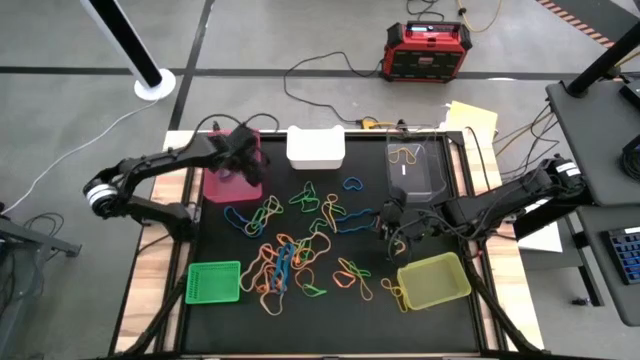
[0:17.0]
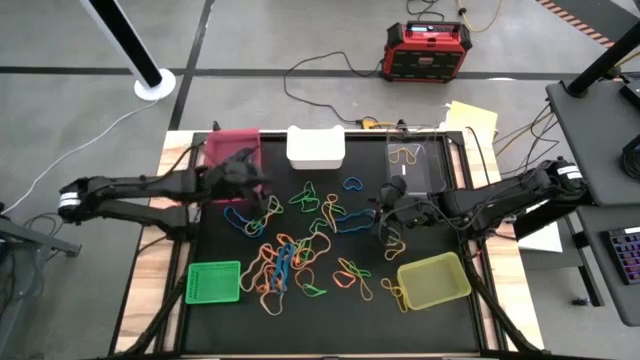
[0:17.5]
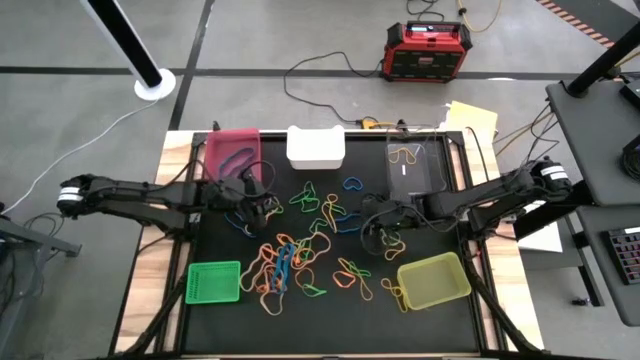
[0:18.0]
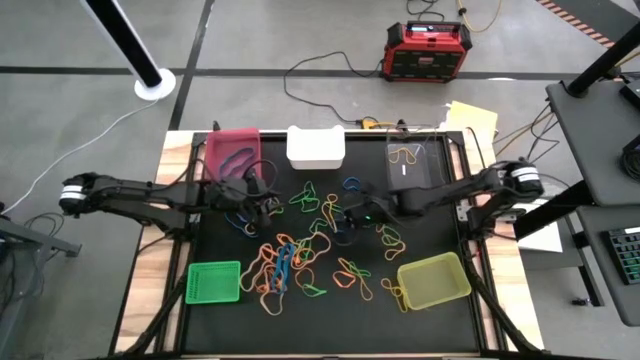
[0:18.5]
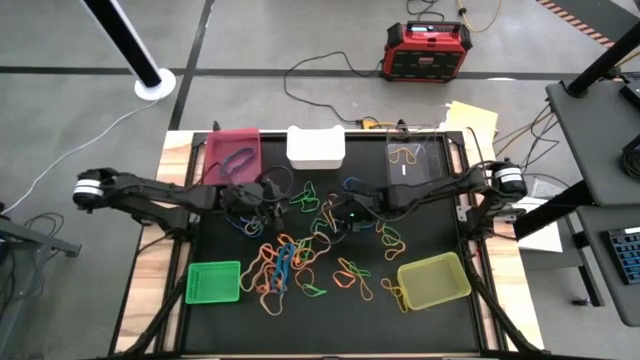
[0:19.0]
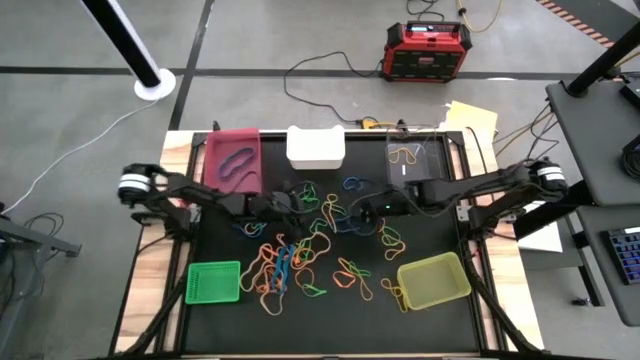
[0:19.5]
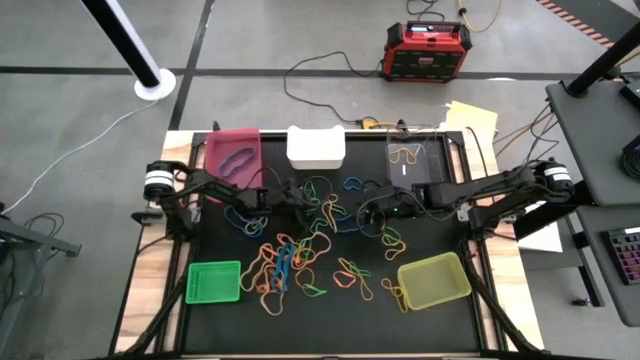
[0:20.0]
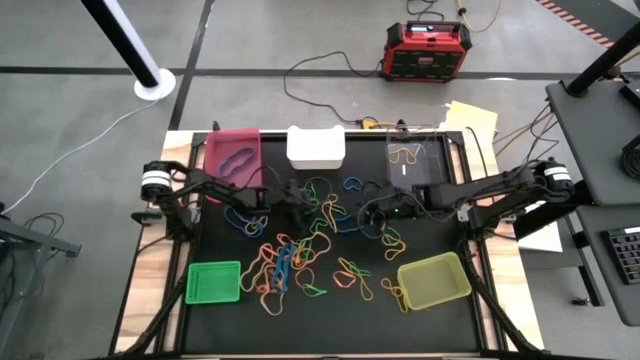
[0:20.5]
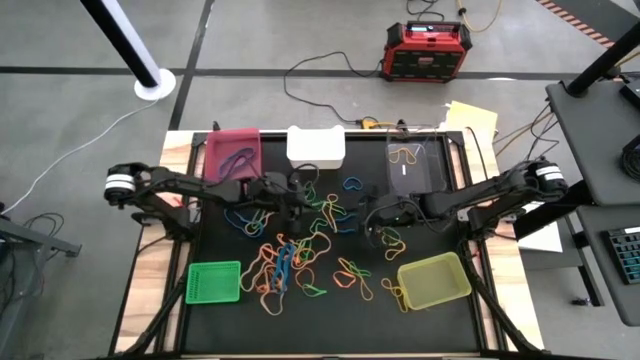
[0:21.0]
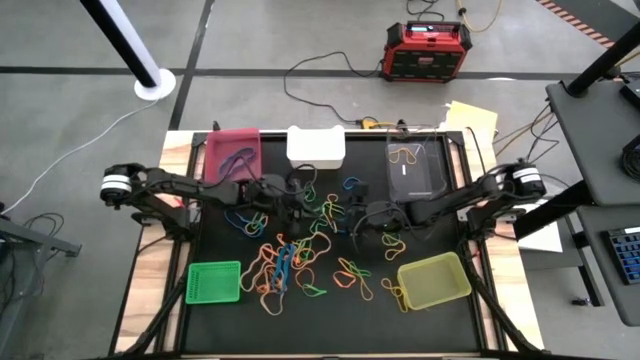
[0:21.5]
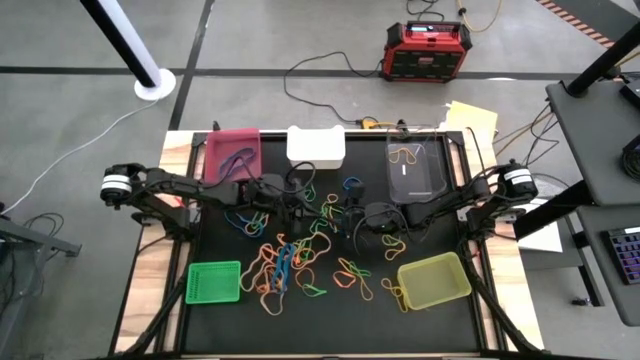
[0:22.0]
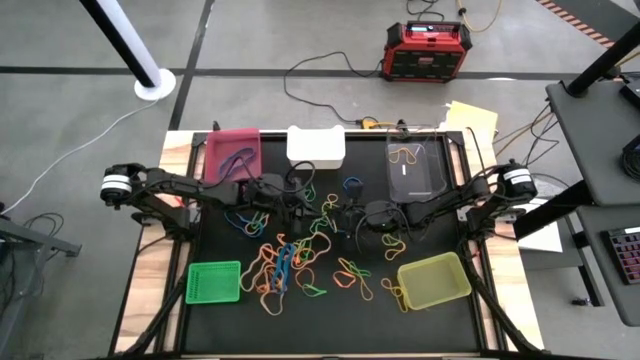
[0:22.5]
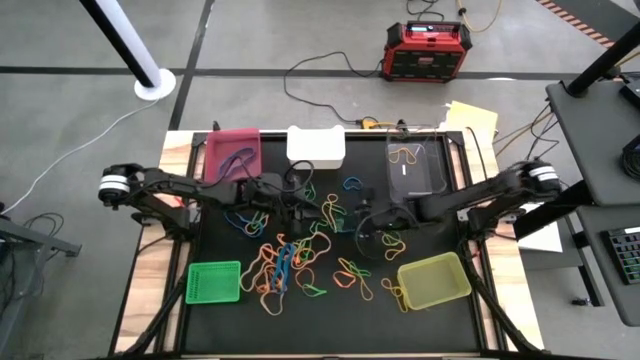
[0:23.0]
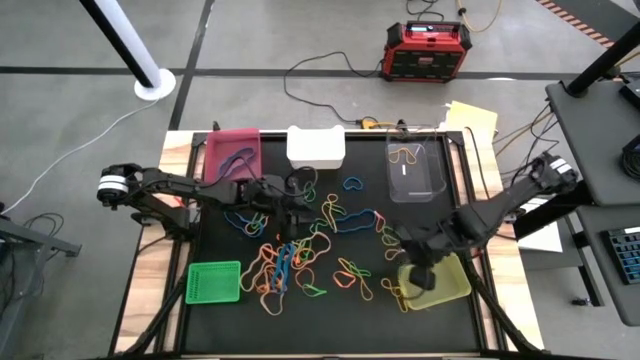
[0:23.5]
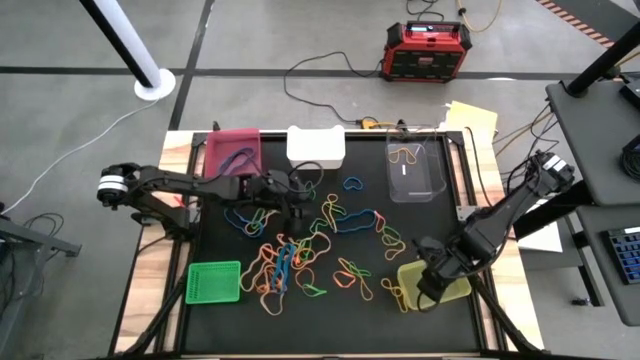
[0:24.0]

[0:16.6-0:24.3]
Task: Sort rubber bands into baskets
Put the green rubber band into the yellow bin

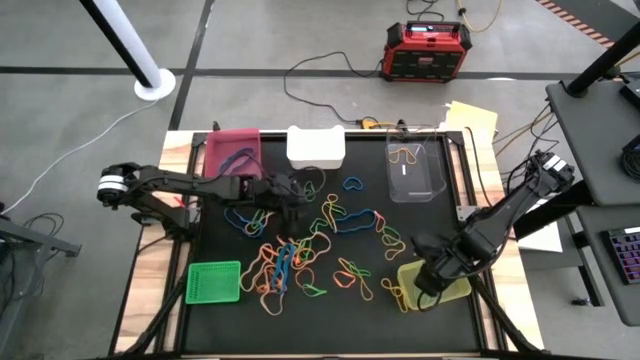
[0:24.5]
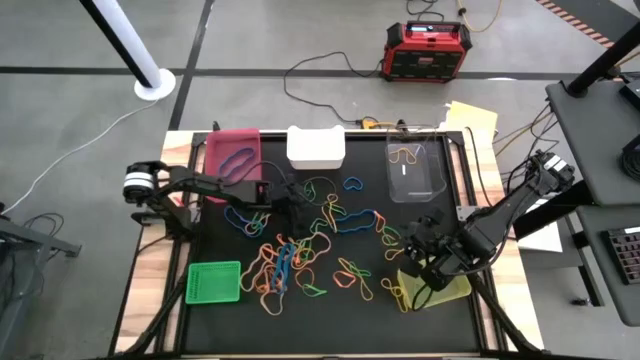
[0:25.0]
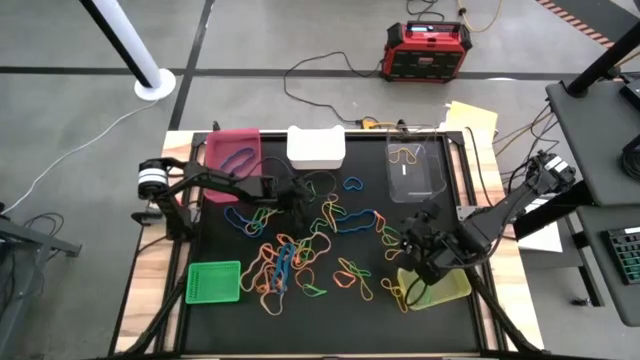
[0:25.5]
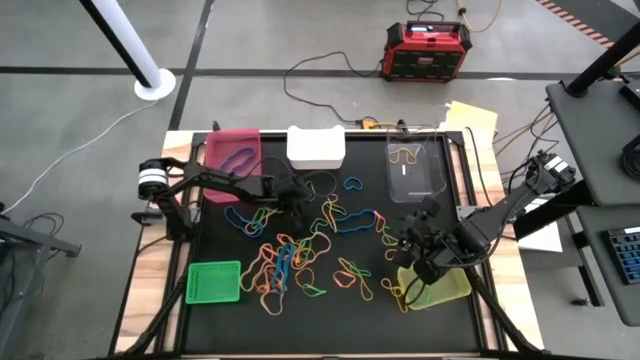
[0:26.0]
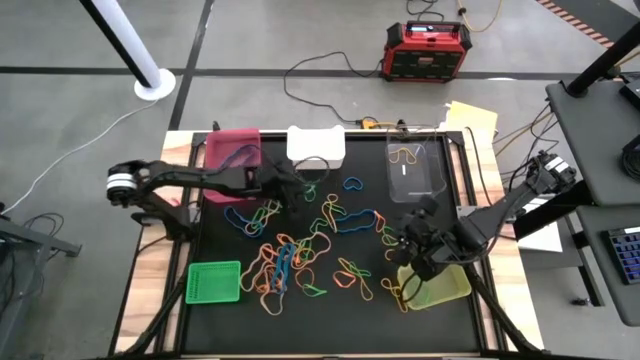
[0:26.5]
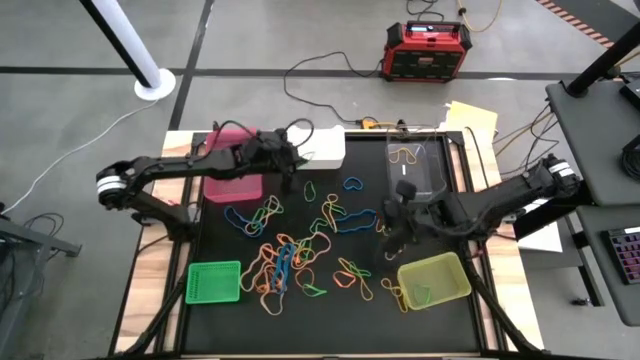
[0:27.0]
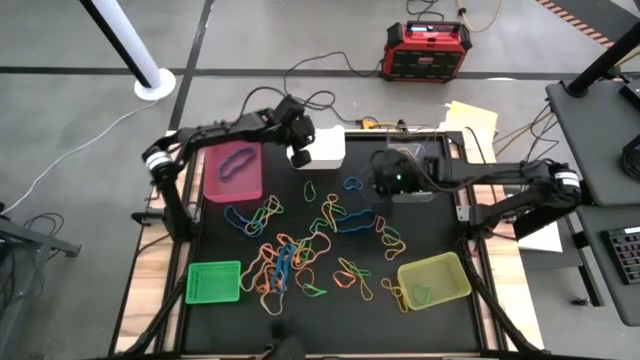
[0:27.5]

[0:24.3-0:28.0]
Put the green rubber band into the white bin

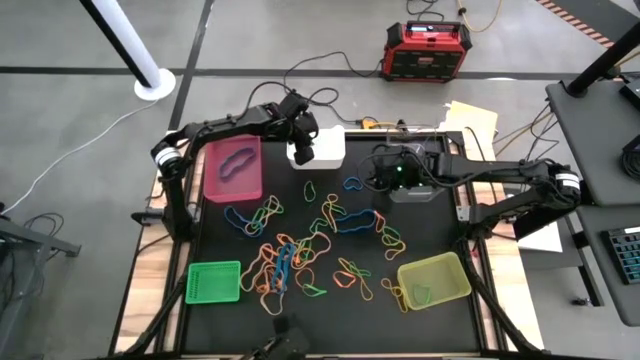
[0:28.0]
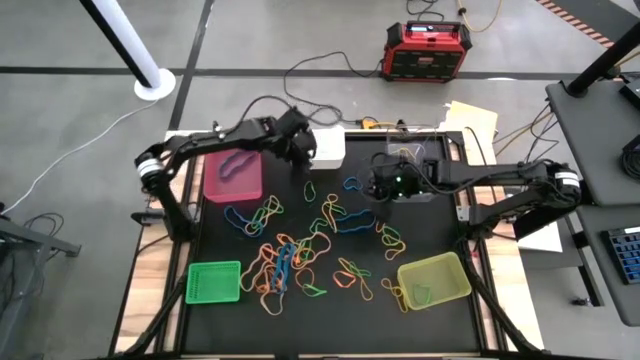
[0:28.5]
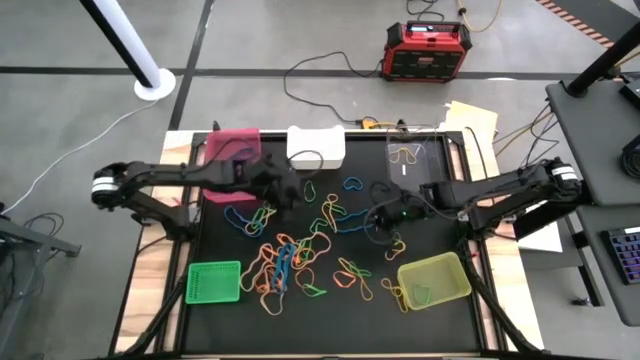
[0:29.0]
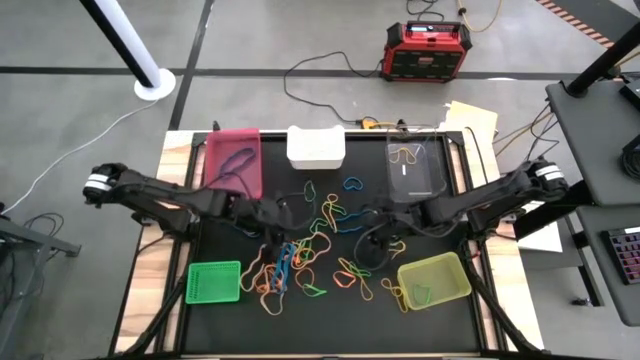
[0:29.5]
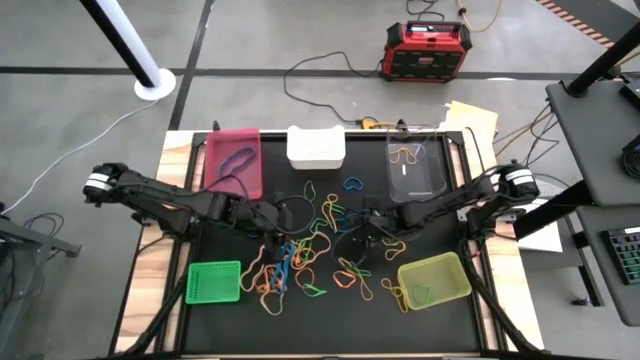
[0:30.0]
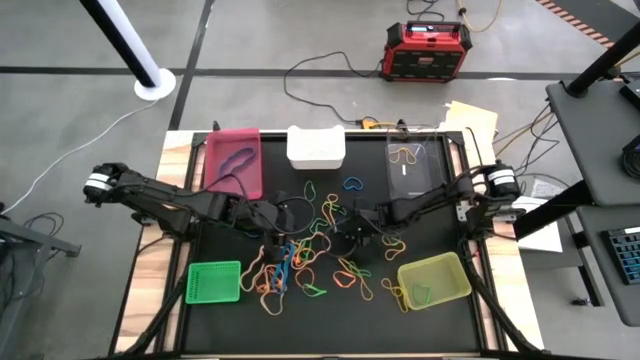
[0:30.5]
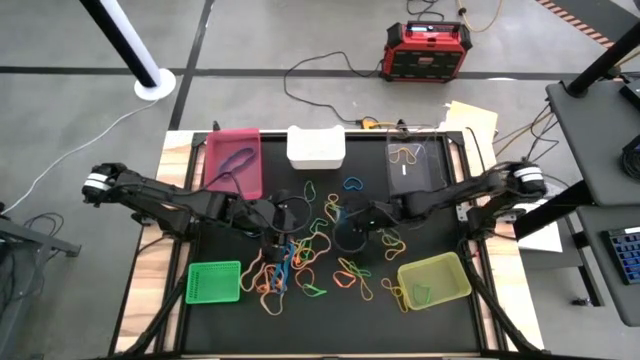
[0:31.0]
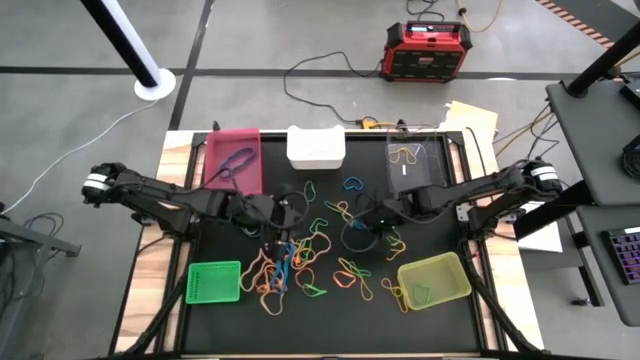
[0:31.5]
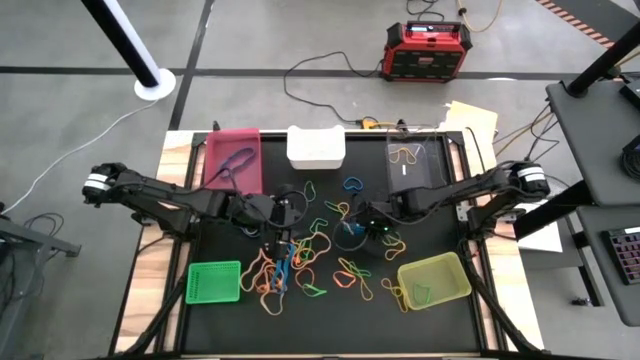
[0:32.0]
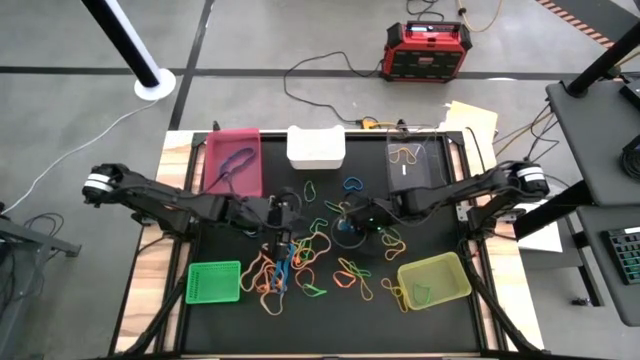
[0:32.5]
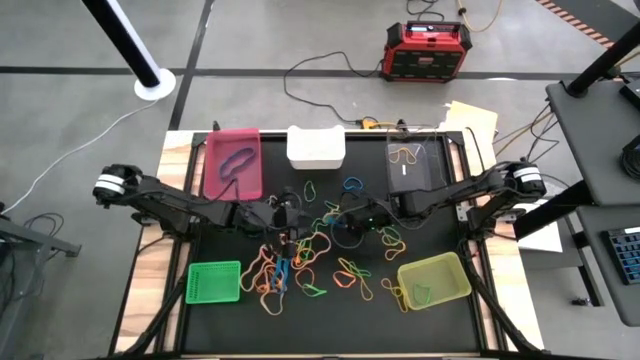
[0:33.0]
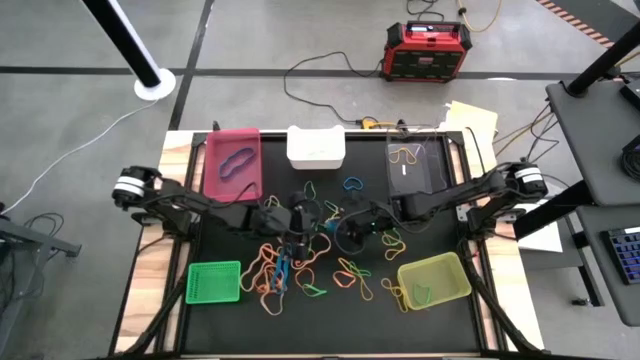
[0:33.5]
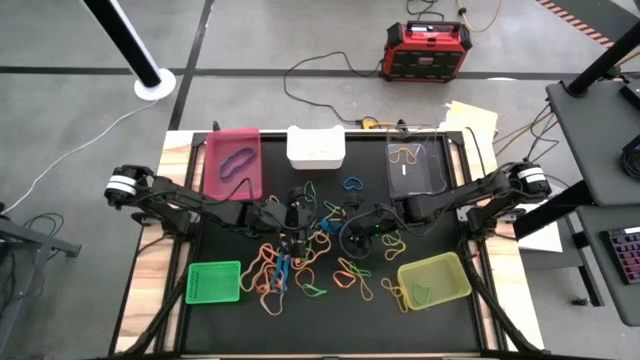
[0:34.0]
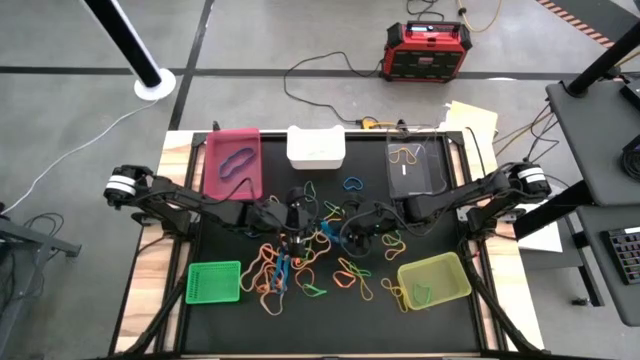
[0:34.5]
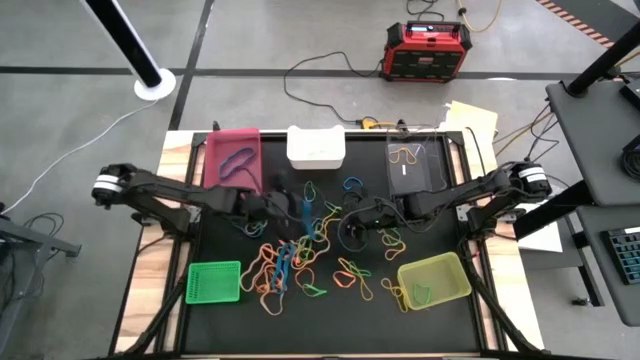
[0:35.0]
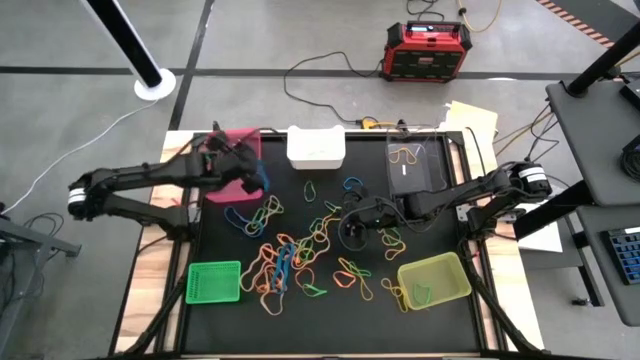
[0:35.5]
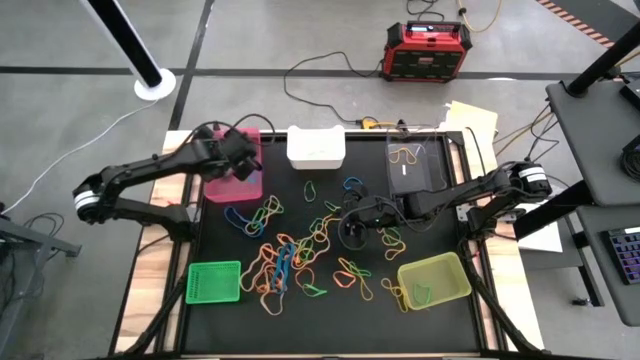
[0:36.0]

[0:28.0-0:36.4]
Put the blue rubber band into the pink bin

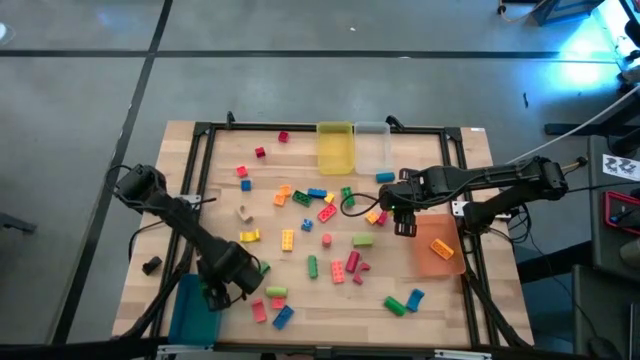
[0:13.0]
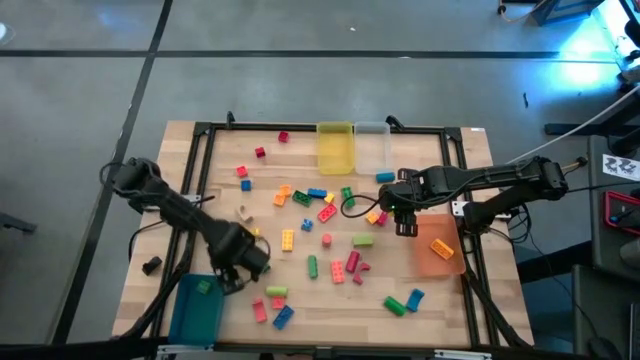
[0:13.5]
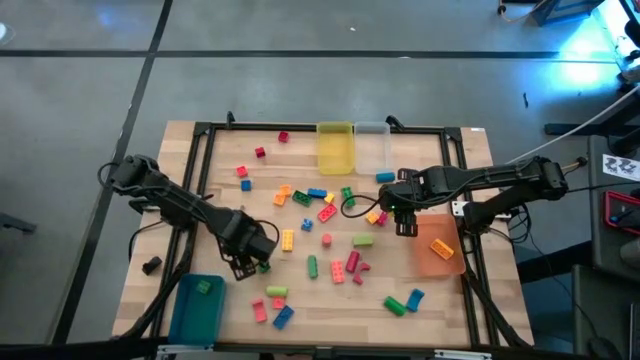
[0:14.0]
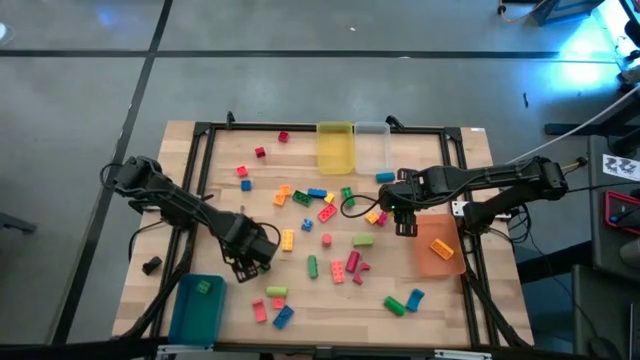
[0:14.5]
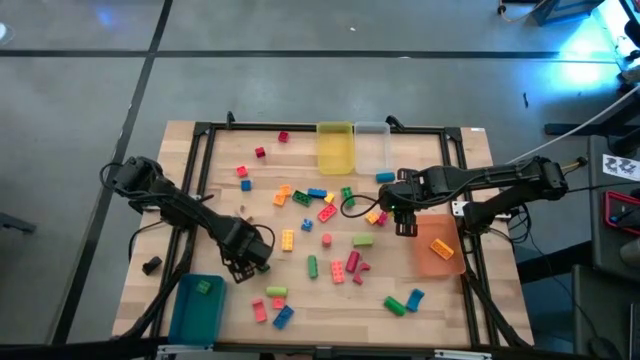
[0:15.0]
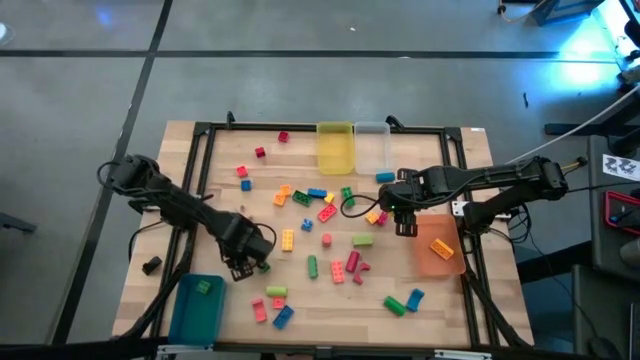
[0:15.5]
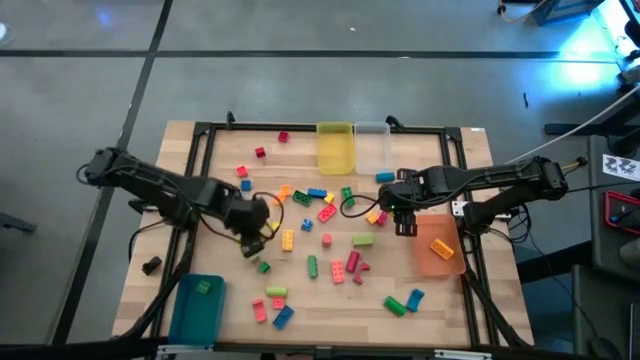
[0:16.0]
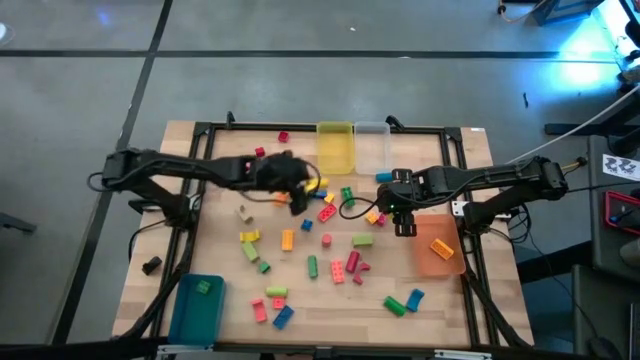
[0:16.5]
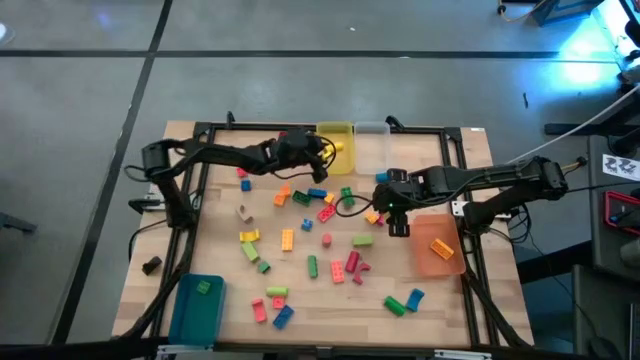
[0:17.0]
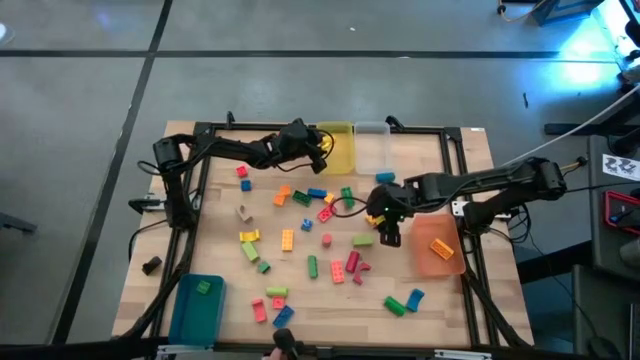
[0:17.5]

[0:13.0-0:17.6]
Task: Sort blocks by size
Put the yellow cylindrical block into the yellow bin
